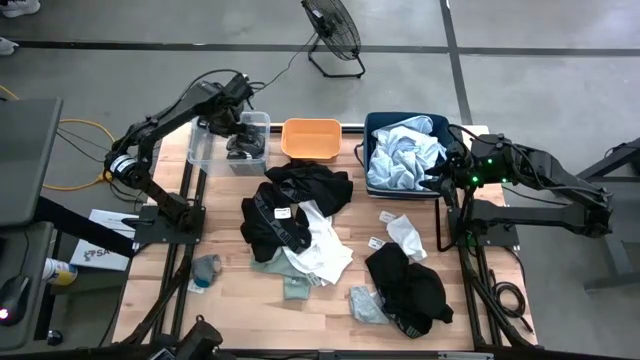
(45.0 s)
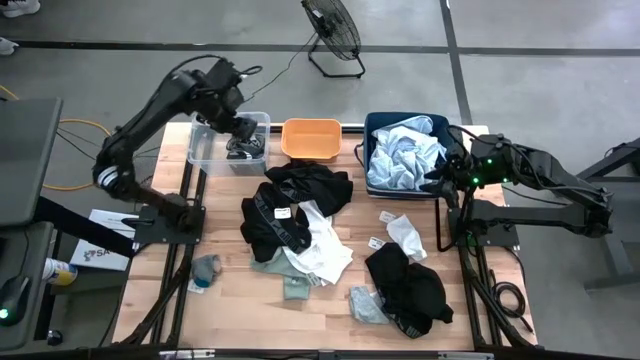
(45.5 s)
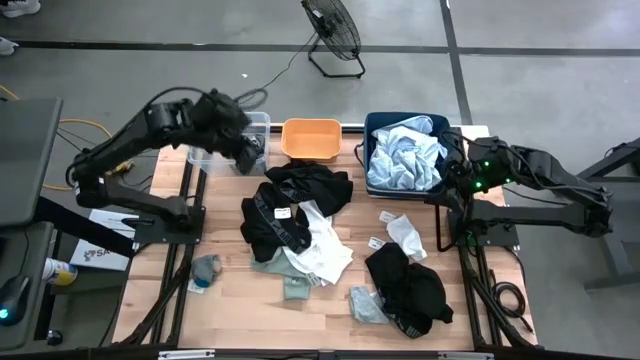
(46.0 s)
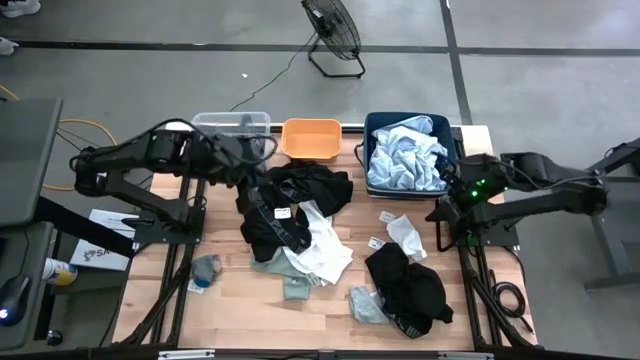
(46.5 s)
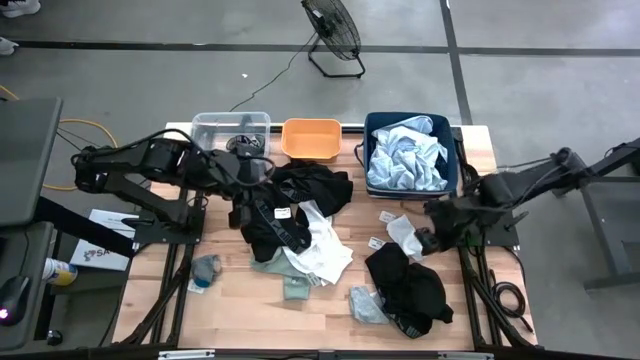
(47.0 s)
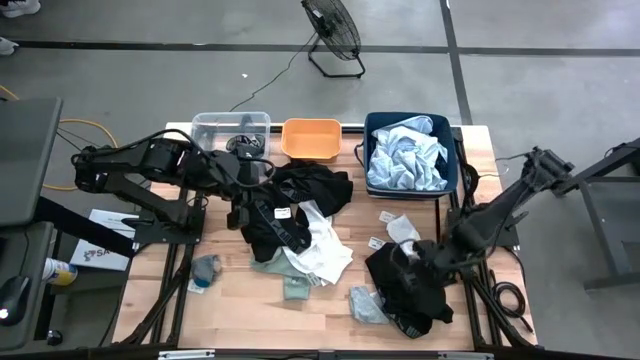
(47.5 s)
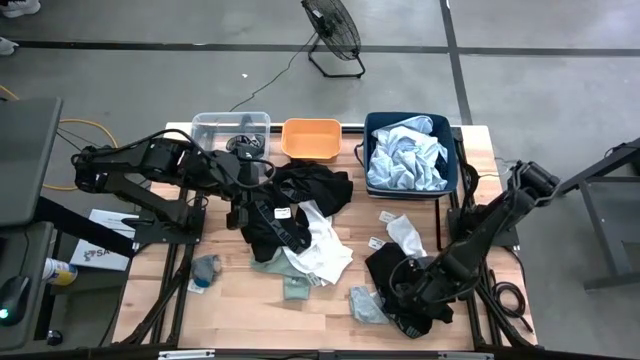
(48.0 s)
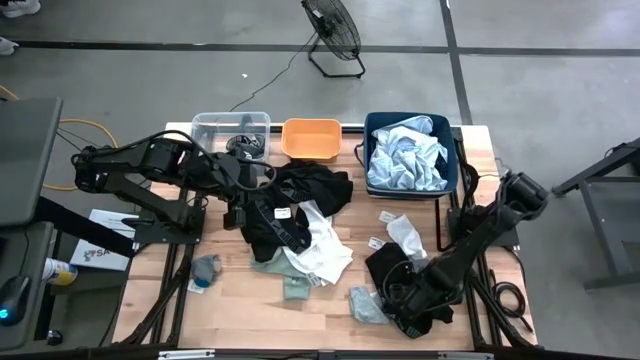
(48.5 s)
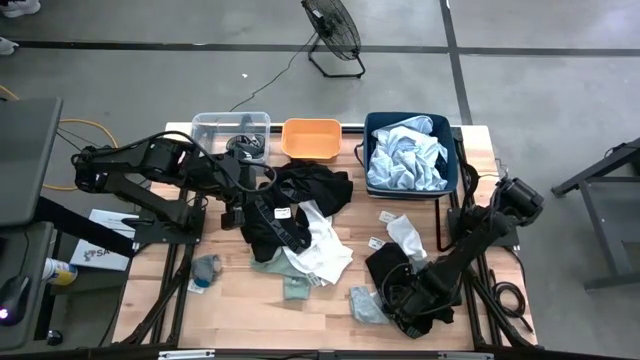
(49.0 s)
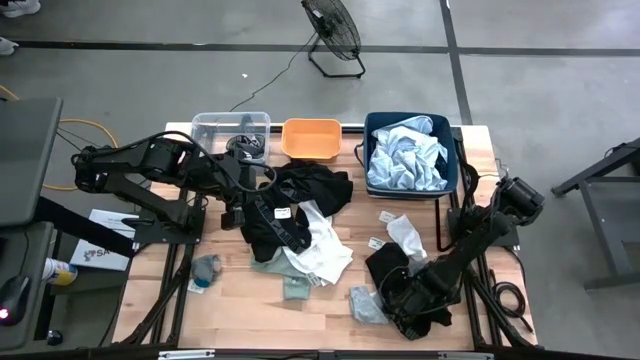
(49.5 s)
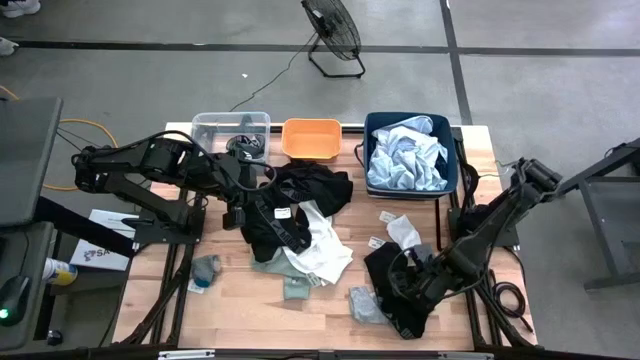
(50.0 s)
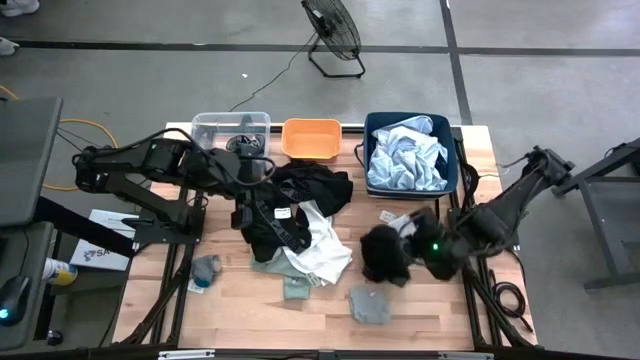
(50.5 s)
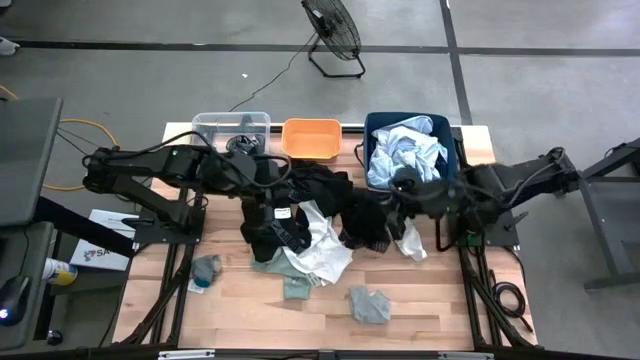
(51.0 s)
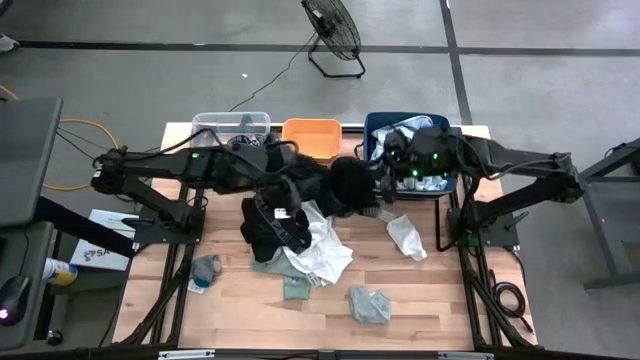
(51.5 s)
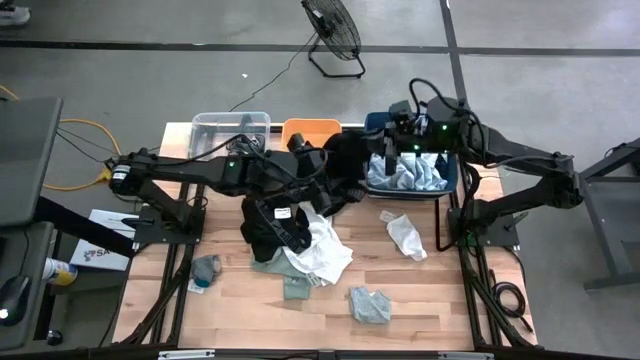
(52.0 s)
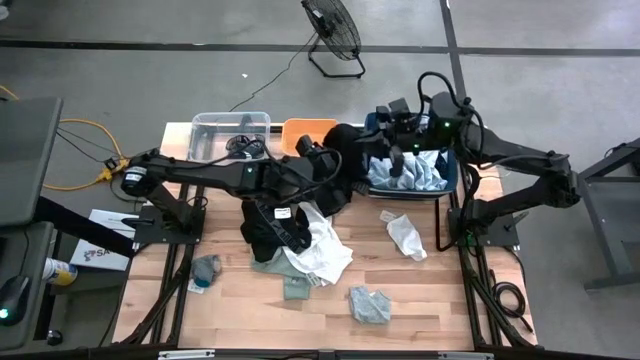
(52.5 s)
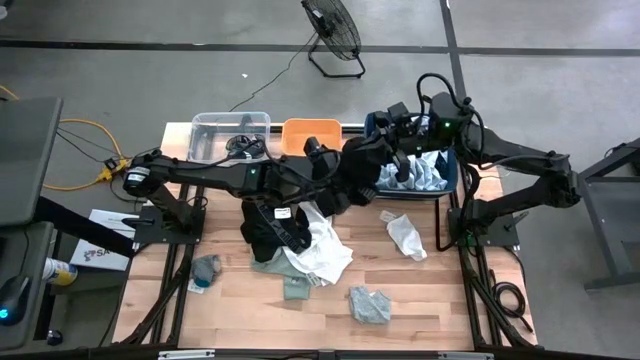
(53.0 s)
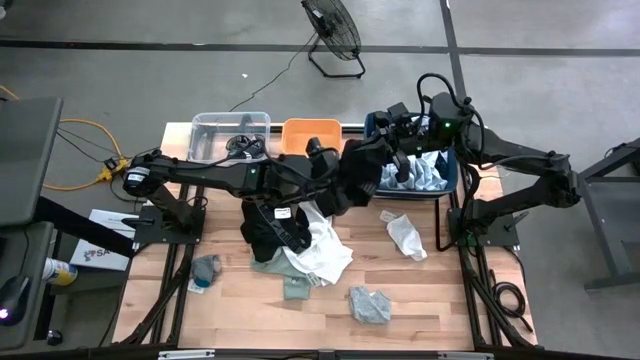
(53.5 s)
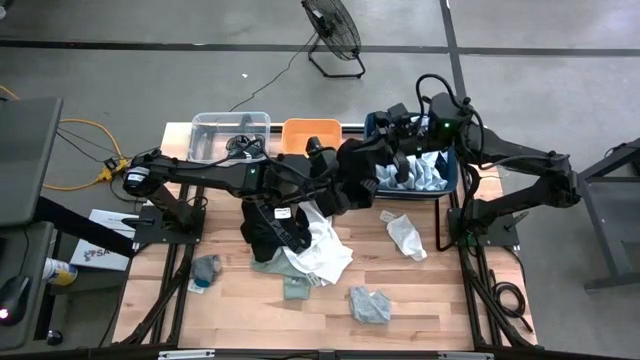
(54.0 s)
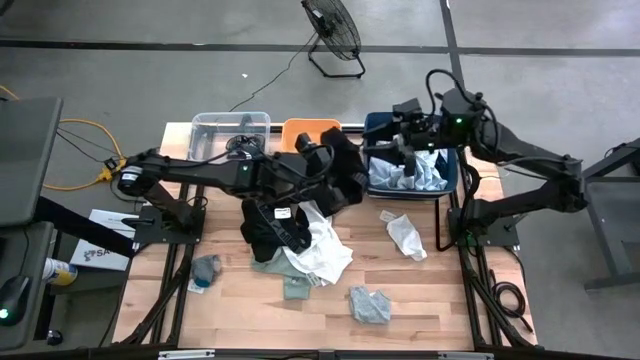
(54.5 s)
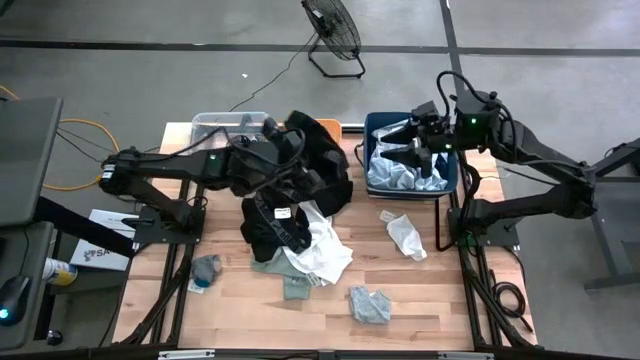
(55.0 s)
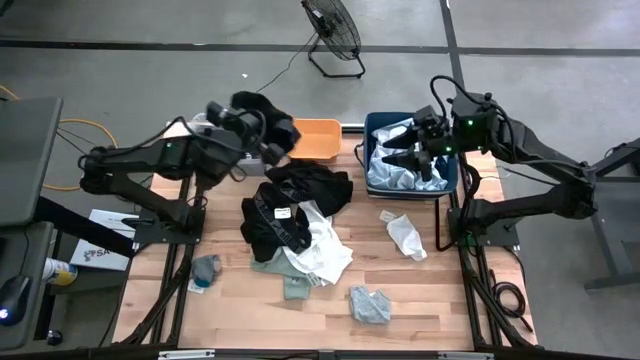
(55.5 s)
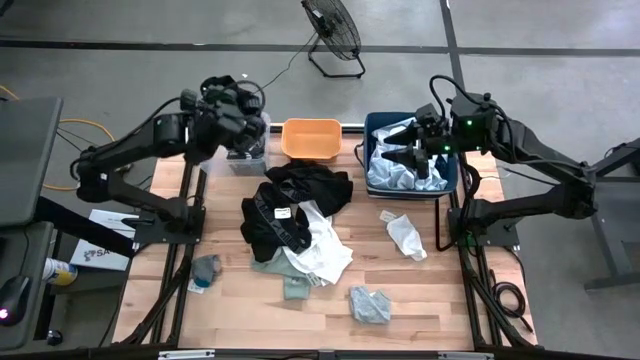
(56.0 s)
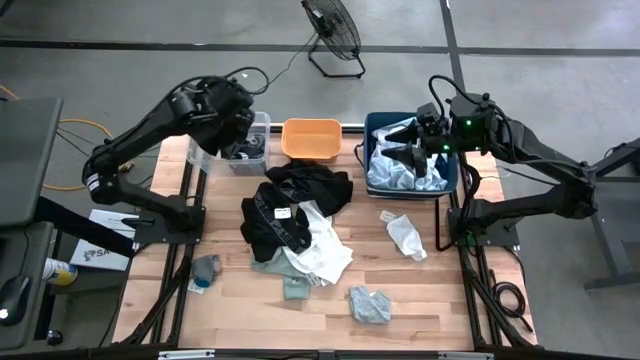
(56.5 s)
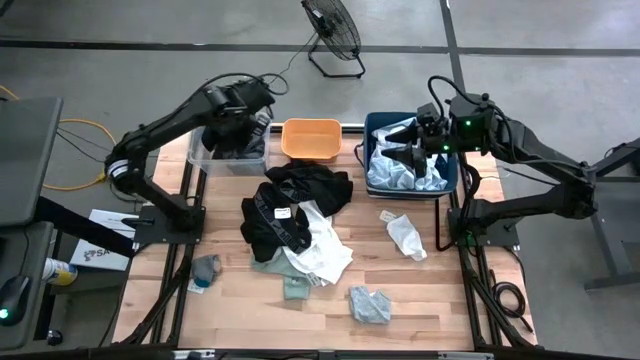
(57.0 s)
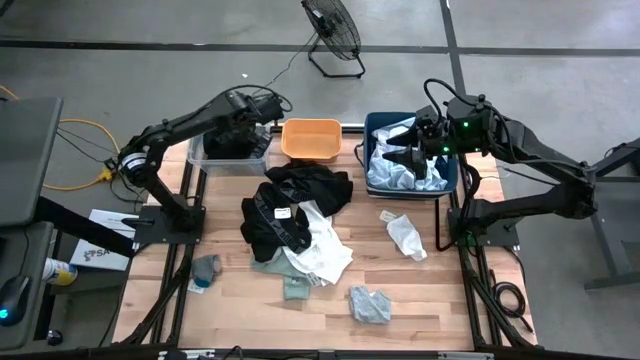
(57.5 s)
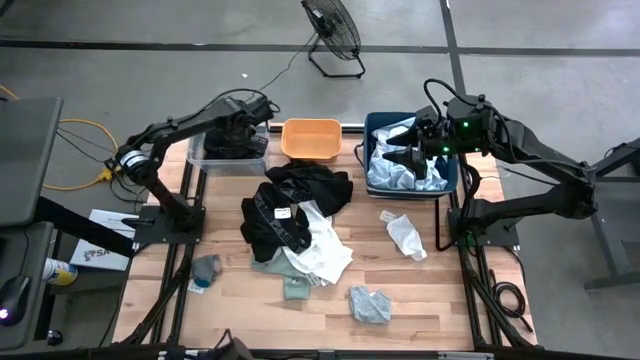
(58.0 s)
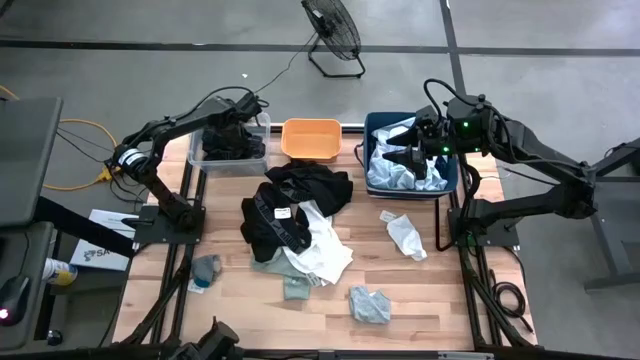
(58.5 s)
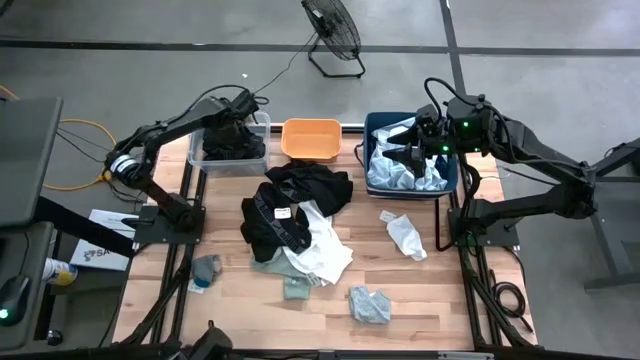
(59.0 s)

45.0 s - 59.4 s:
Task: Pick & Place Cloths
Put the black underwear into the transparent bin

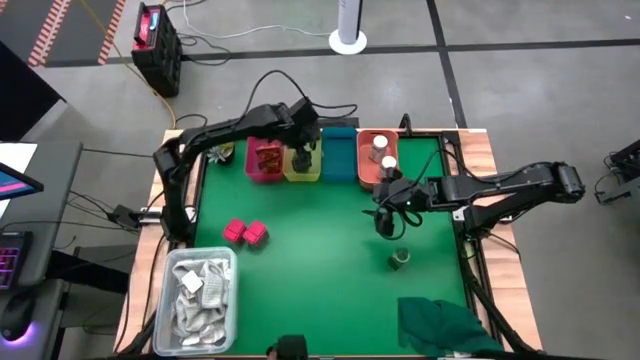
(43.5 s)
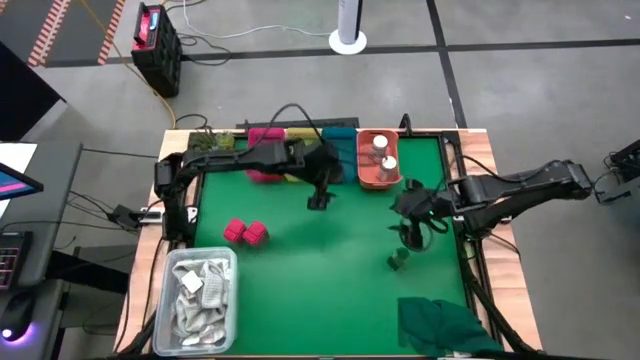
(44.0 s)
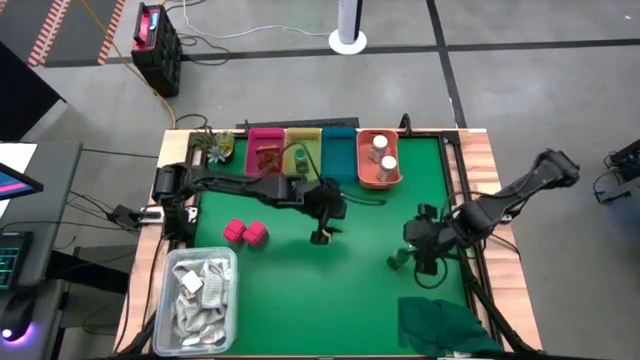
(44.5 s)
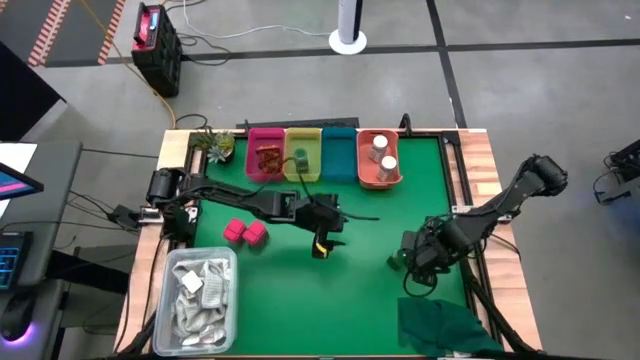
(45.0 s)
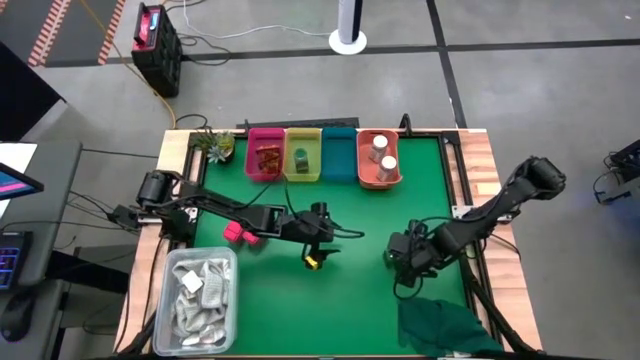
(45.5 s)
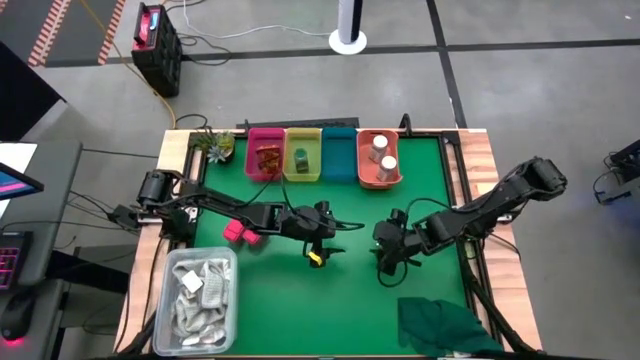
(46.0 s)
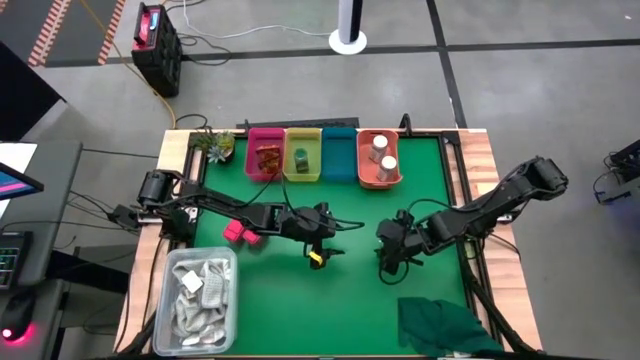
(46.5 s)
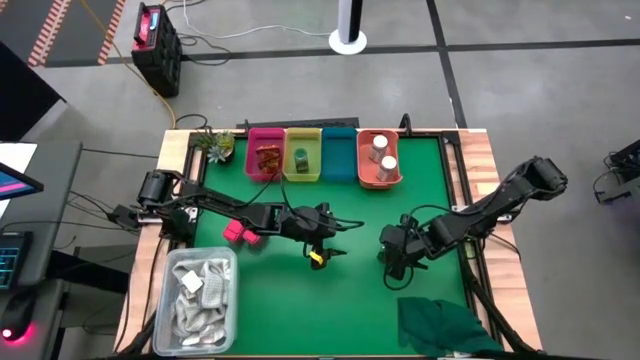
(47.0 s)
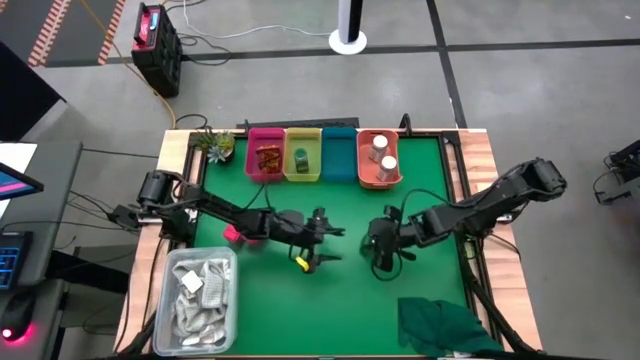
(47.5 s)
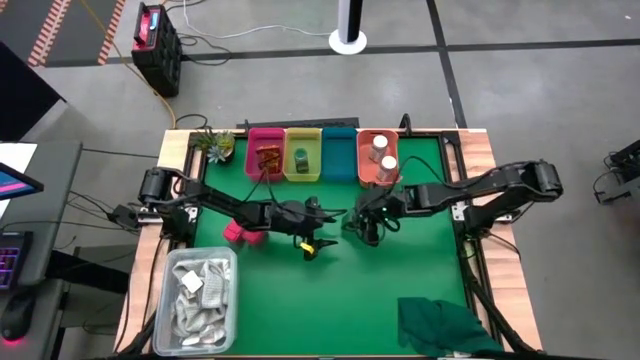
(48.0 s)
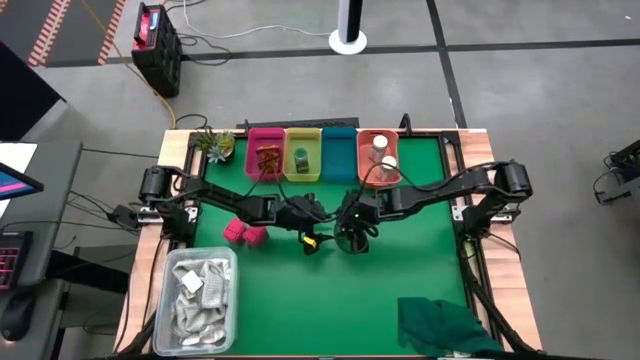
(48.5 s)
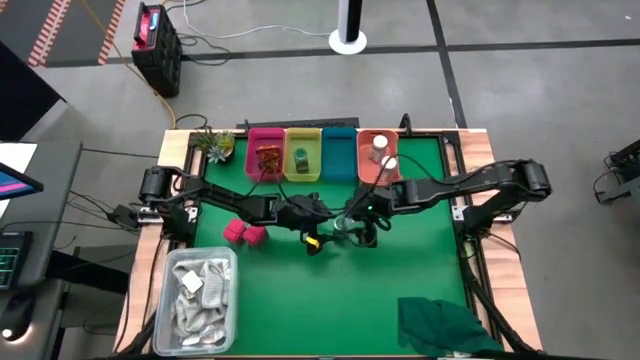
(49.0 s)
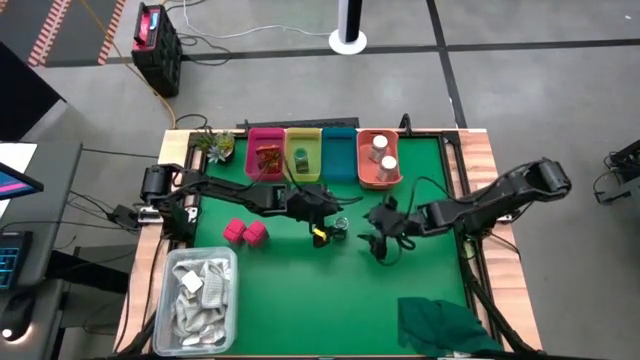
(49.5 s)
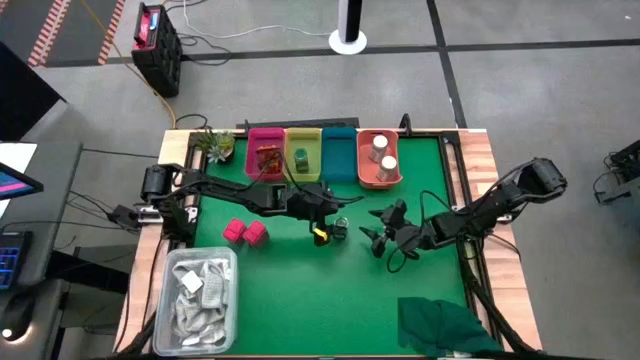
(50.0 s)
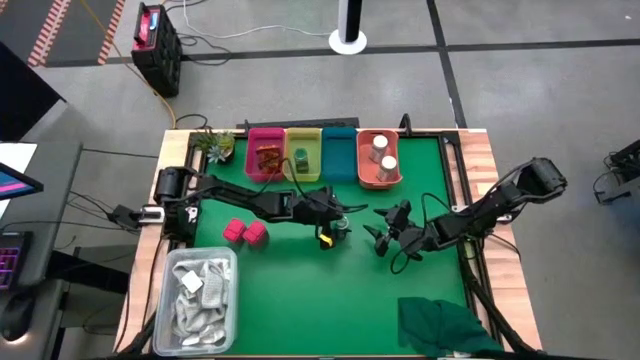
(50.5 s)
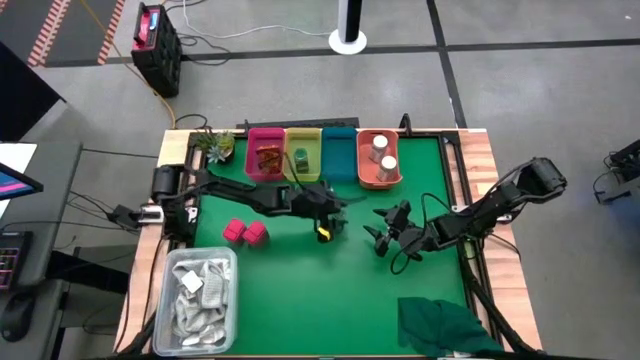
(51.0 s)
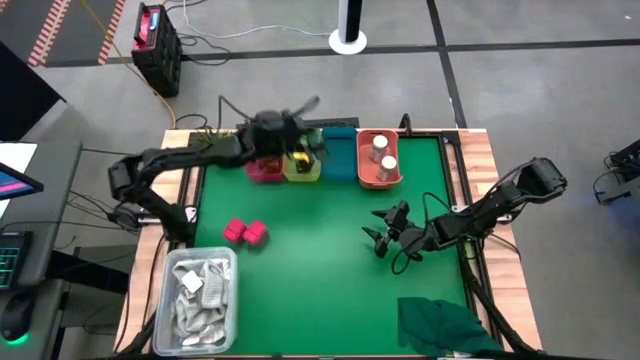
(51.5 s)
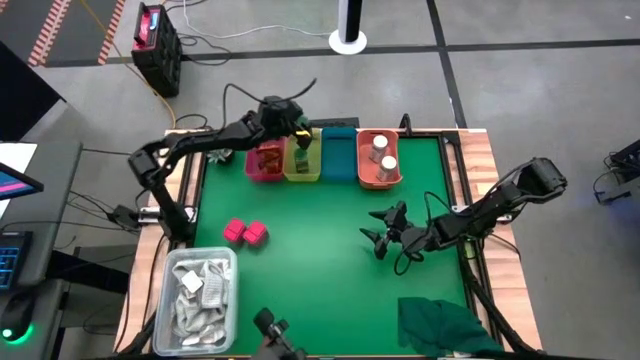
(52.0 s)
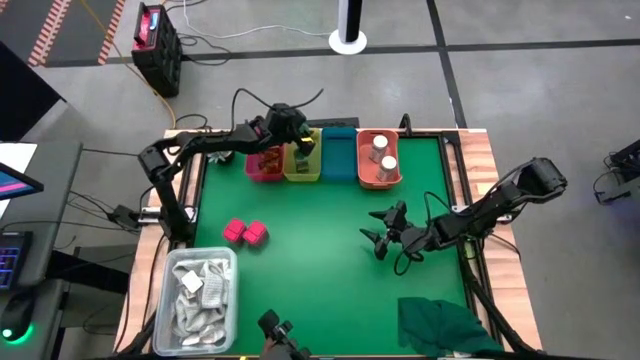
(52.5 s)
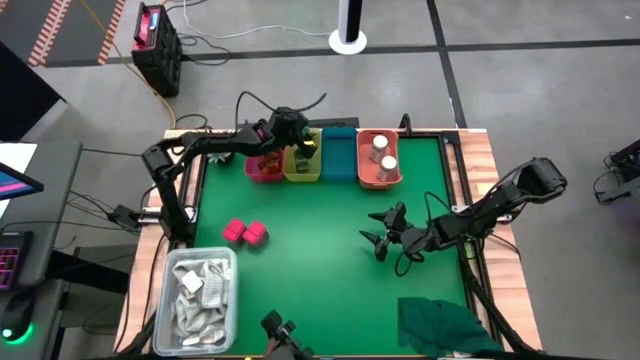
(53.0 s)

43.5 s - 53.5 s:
Task: Sort spices by type
Put the green lid seasoning bottle into the yellow bin
